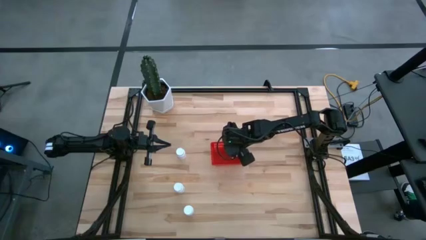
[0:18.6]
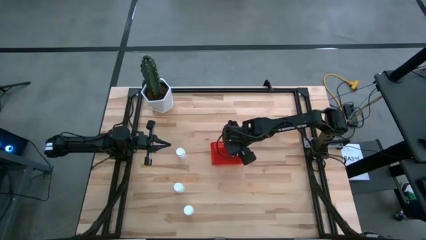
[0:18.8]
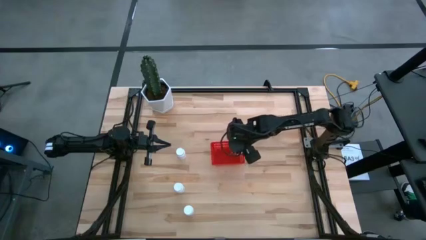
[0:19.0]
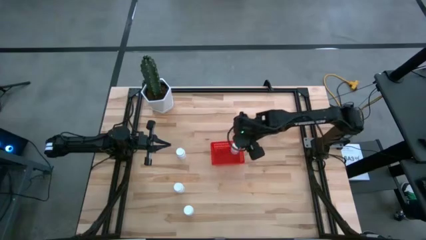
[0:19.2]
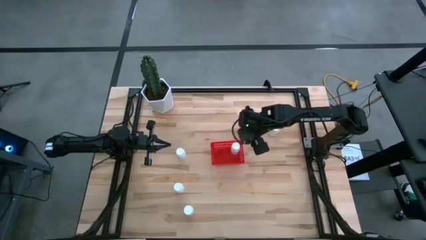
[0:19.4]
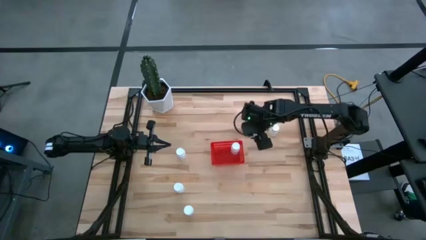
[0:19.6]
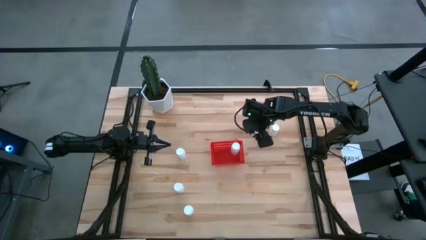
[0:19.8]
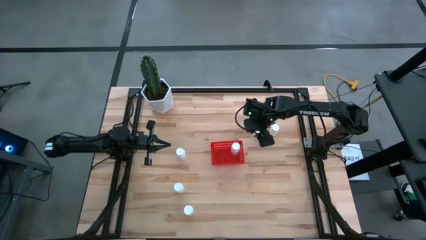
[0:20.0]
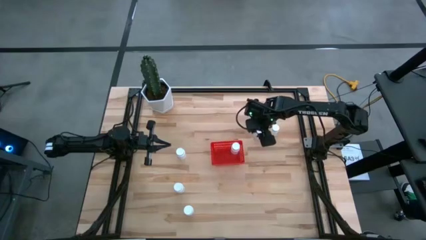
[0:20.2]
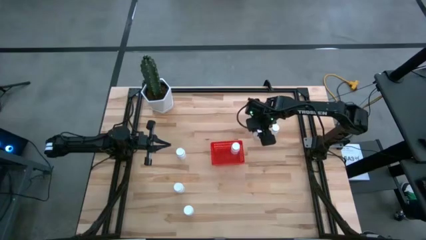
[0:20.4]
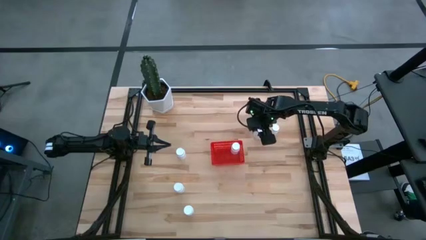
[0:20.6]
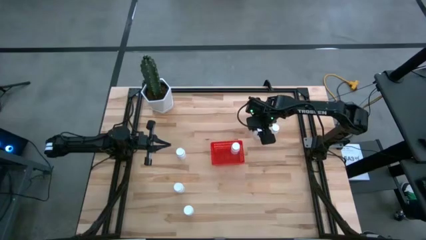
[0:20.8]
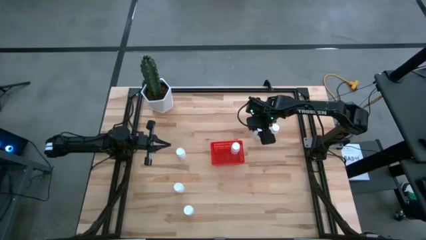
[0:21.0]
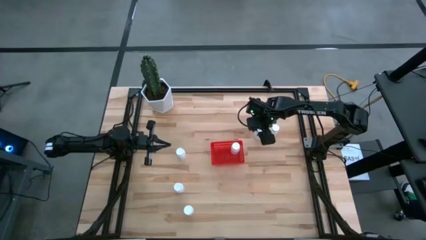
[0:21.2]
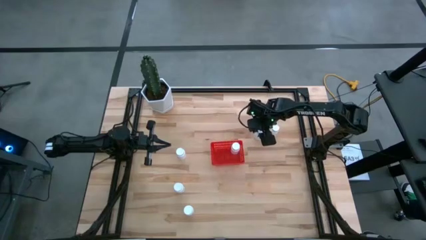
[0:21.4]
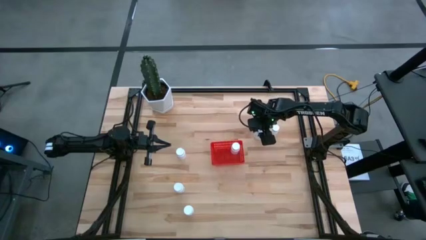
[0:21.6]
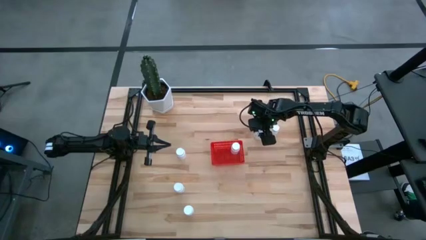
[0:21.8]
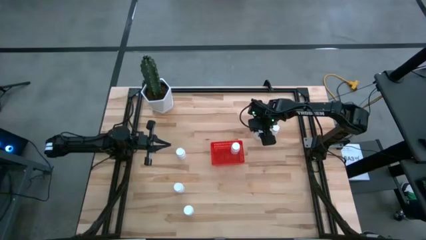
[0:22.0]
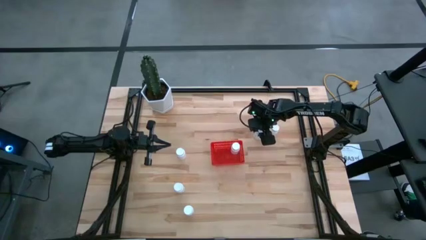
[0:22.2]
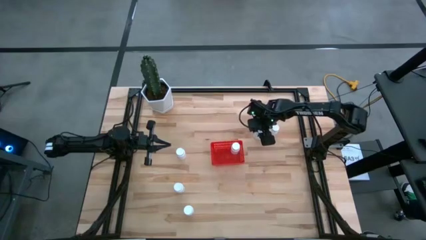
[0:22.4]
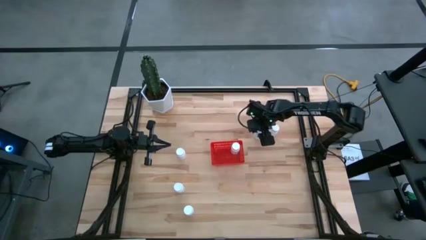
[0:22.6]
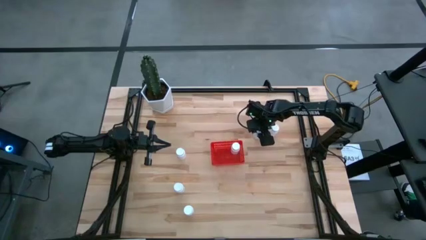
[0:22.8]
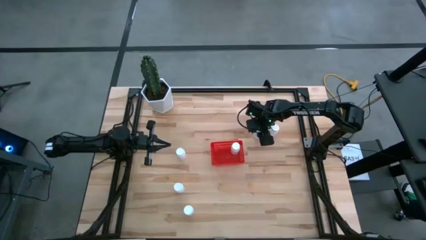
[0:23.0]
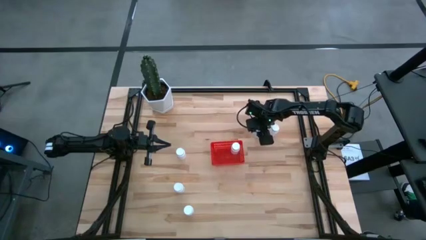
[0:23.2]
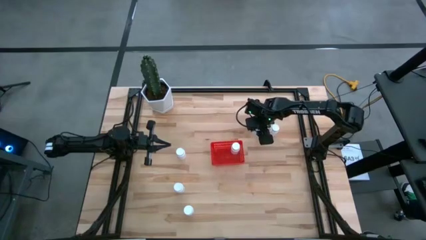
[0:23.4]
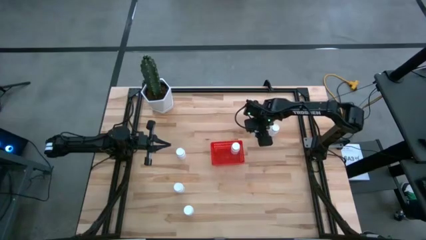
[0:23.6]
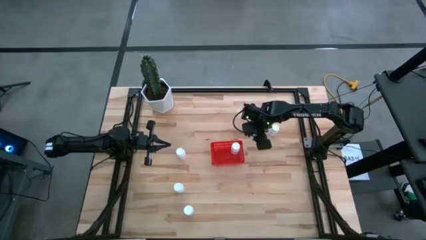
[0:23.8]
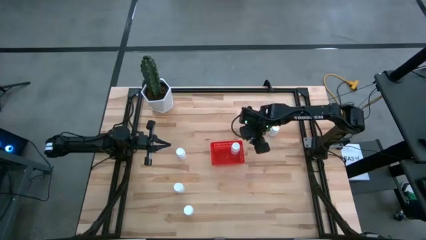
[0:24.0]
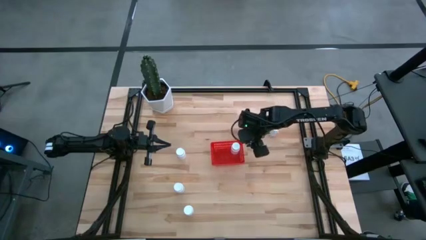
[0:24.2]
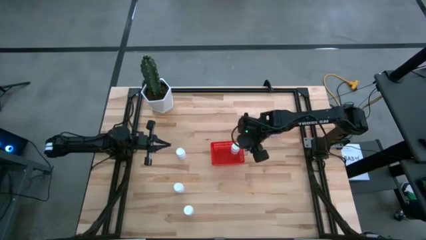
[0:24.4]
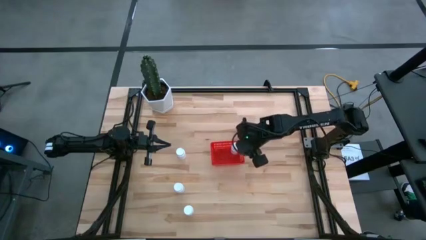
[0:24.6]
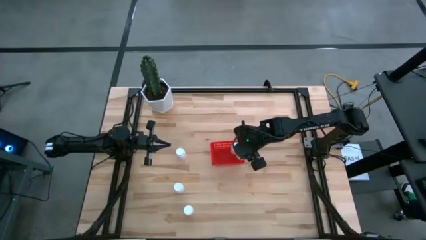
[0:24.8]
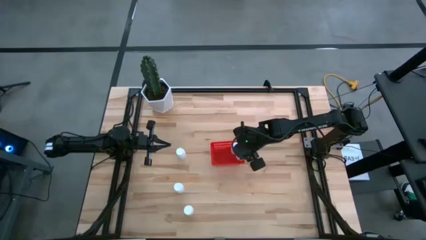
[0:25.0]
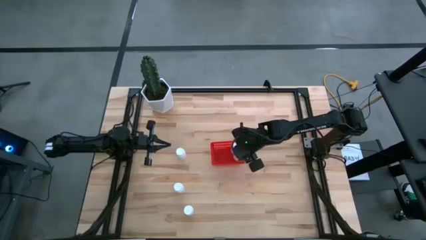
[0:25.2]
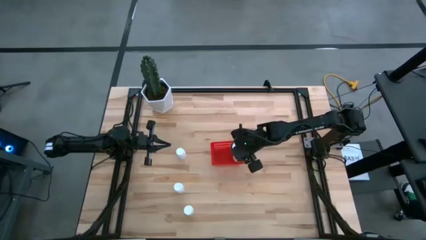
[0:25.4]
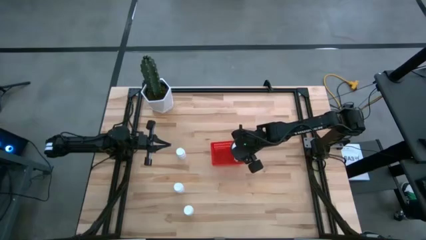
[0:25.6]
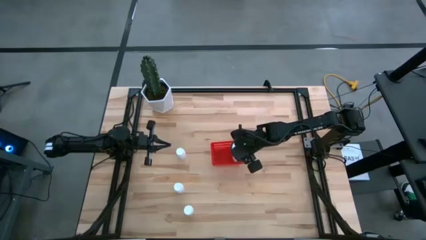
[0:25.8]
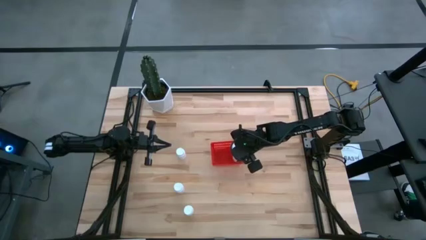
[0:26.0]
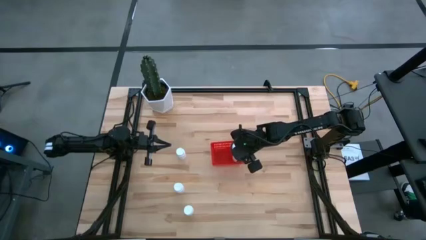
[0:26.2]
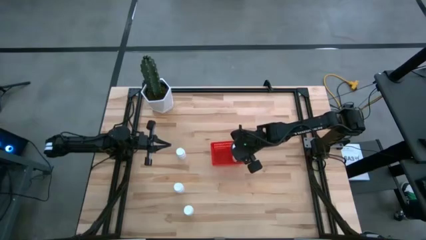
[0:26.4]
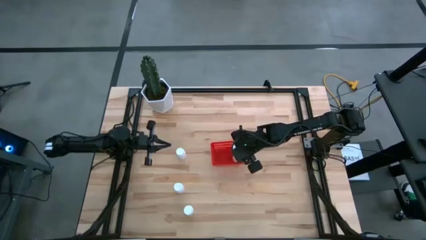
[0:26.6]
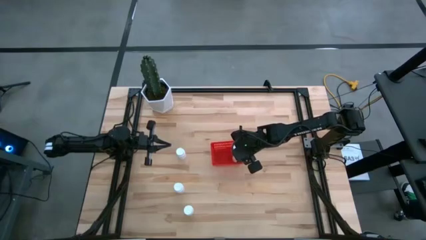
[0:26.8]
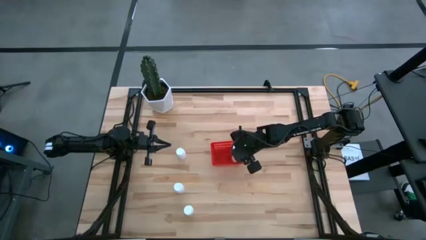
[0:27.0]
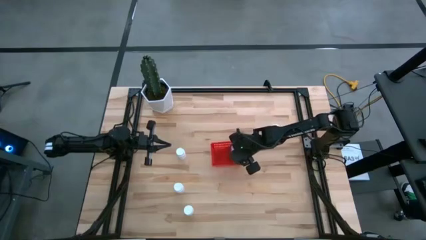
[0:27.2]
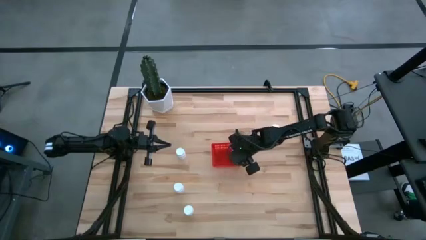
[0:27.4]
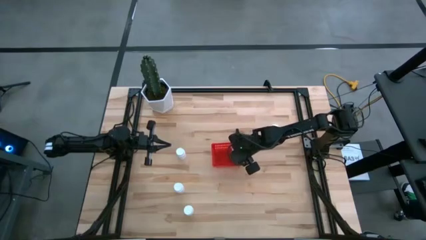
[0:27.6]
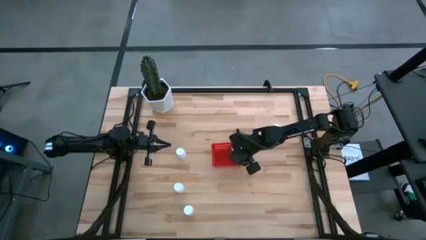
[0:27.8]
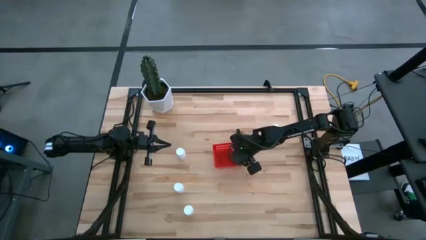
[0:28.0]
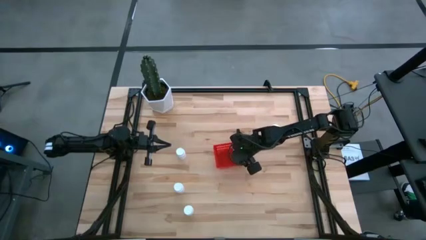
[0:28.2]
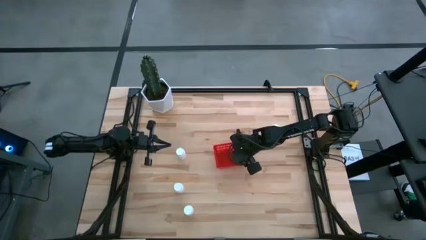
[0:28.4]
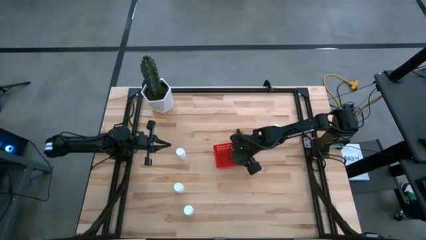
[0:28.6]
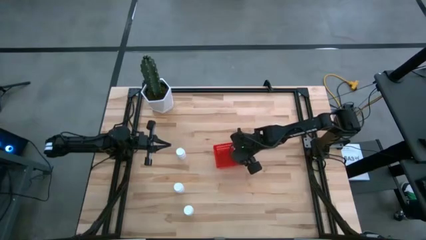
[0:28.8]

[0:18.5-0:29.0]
Task: Pick and place pill bottles into a basket
Put the white medicine bottle into the red basket

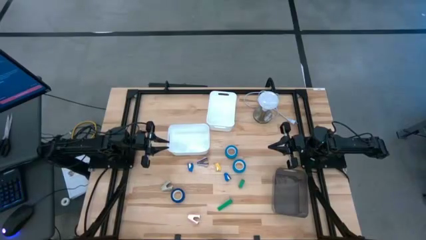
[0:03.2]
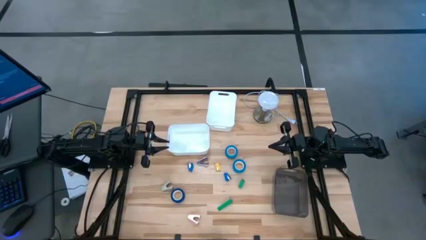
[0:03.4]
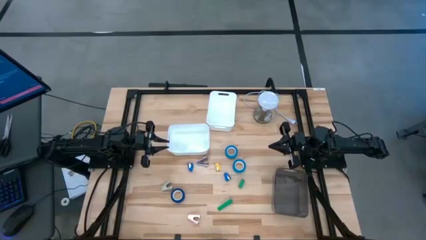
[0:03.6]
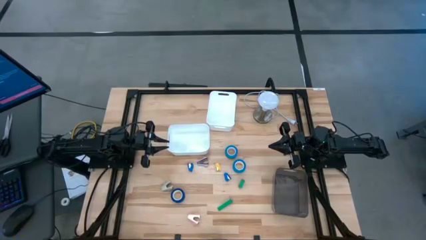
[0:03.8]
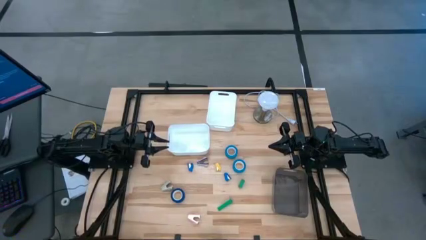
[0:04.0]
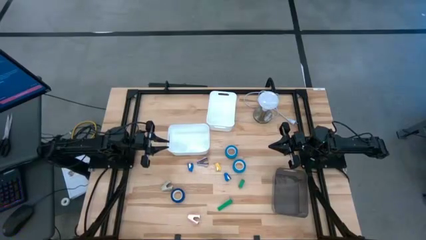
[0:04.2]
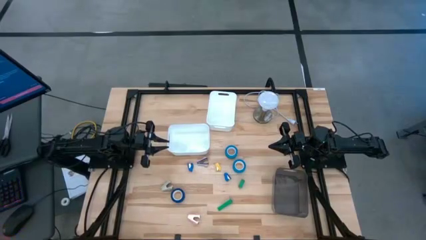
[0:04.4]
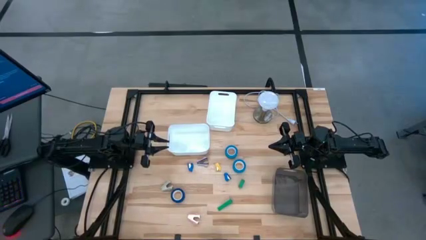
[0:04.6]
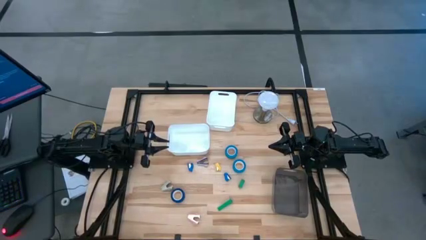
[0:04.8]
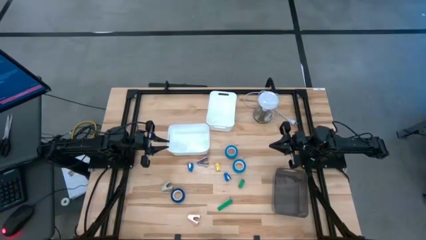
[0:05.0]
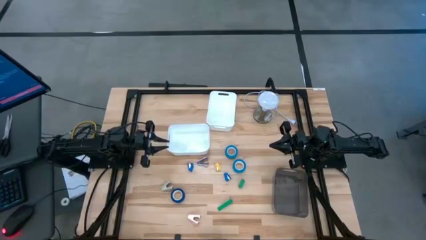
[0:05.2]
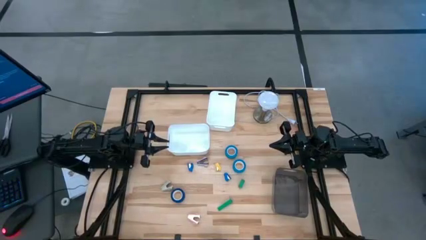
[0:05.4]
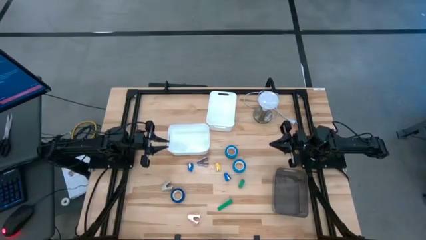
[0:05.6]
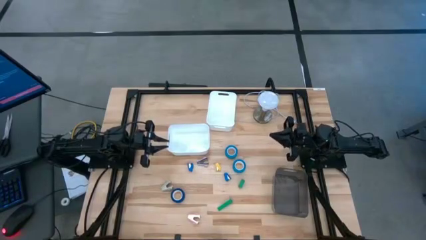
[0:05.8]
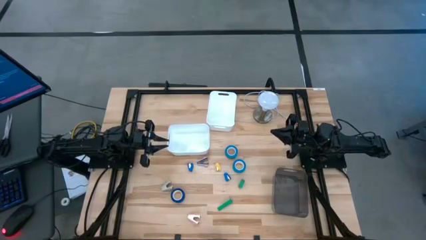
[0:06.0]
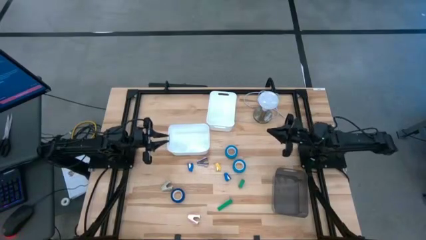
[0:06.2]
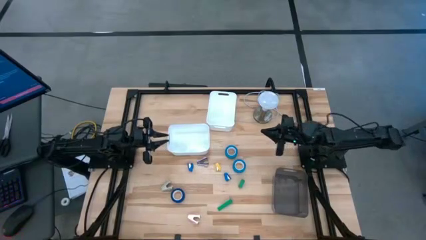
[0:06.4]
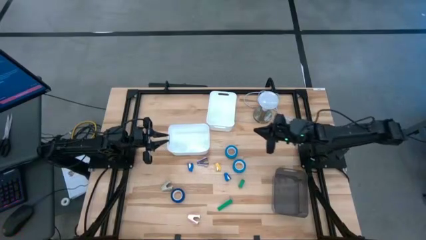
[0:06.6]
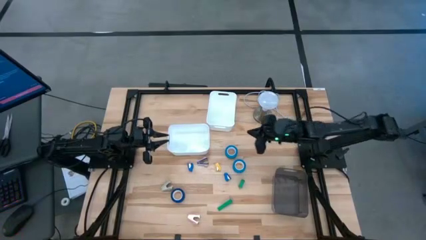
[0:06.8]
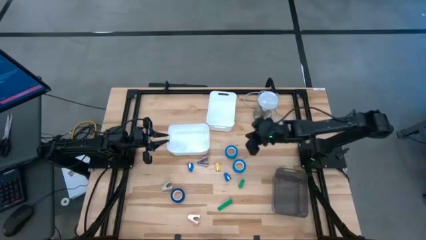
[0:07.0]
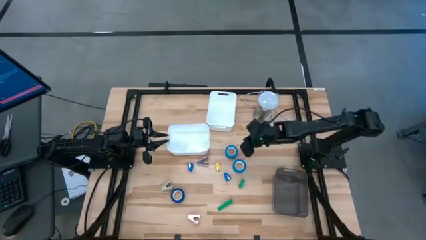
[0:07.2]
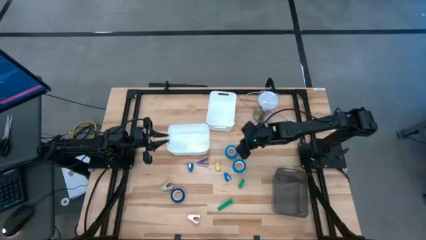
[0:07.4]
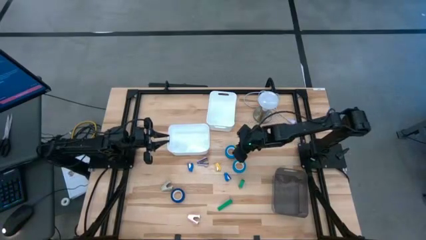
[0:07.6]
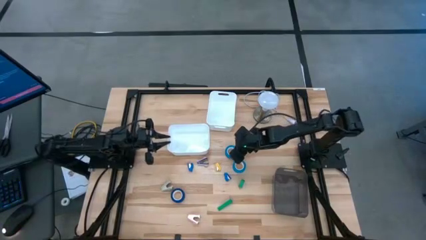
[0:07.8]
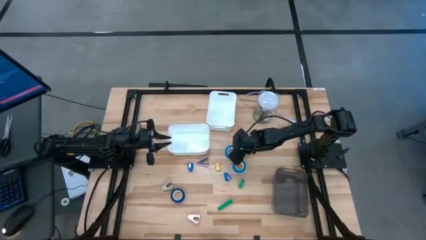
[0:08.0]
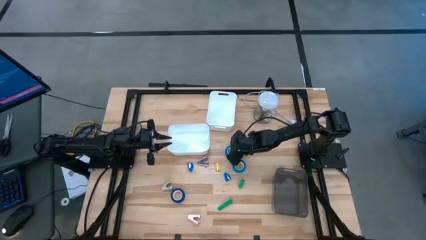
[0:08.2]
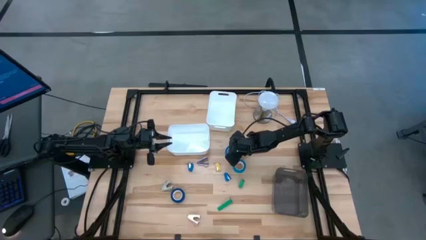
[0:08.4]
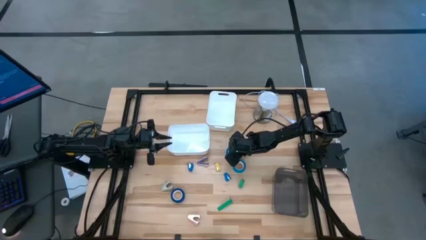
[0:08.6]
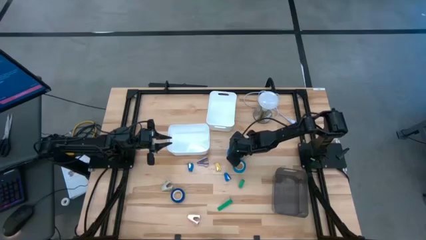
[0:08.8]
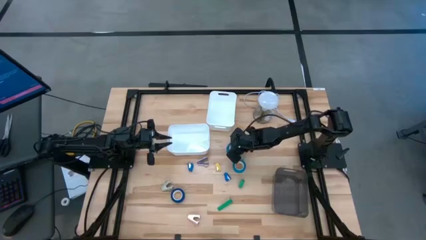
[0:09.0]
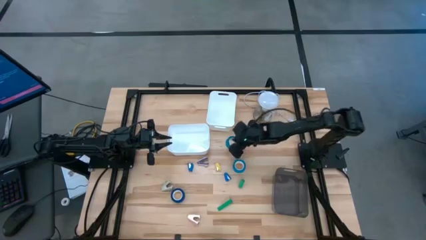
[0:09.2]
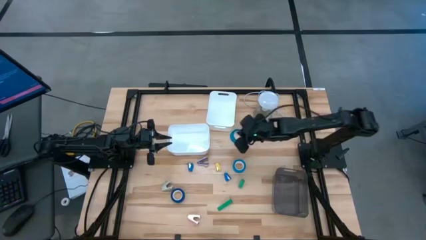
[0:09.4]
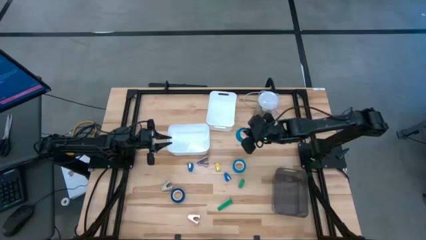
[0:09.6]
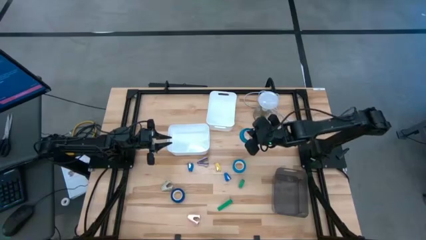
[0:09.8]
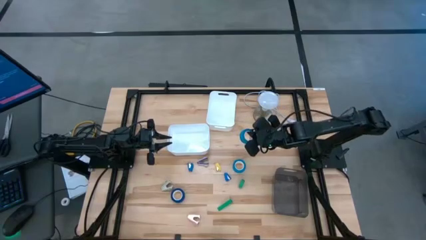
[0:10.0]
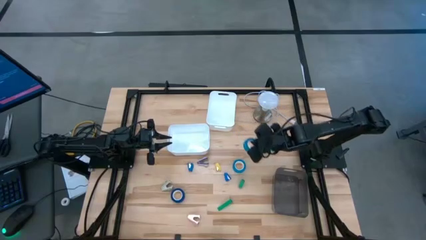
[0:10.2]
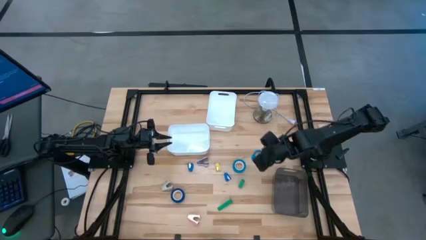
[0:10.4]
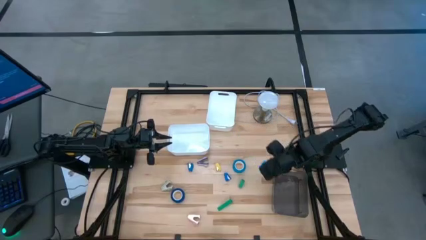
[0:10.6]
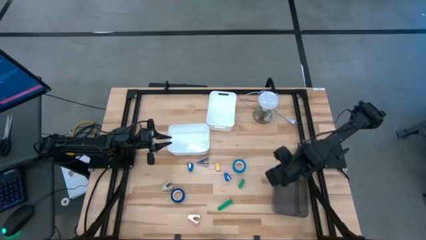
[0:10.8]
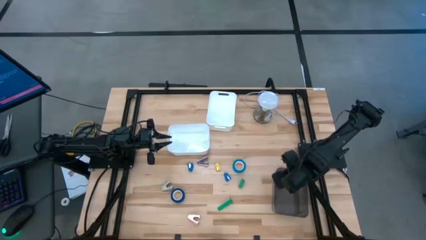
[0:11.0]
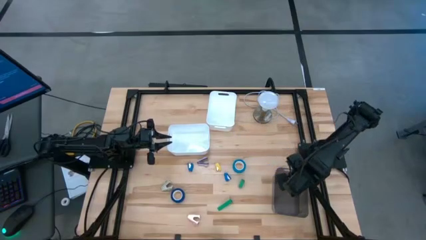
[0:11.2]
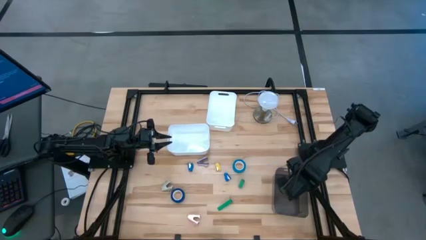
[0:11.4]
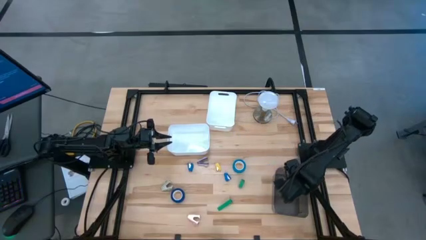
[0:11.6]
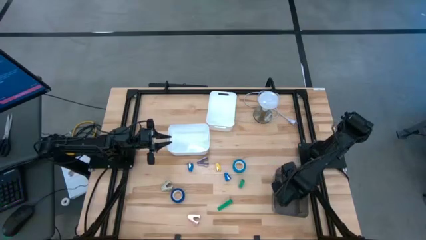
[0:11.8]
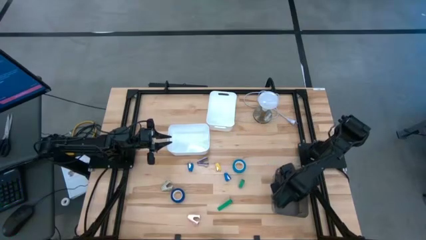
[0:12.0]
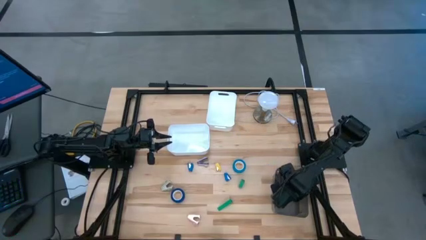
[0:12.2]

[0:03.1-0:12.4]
Task: Pick and place Stapler, Stapler remover, tape
Put the top blue tape into the black transparent bin
